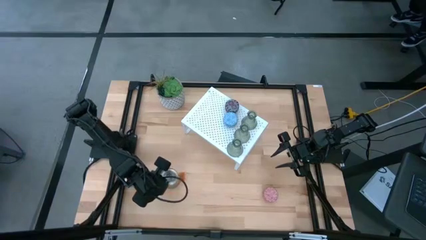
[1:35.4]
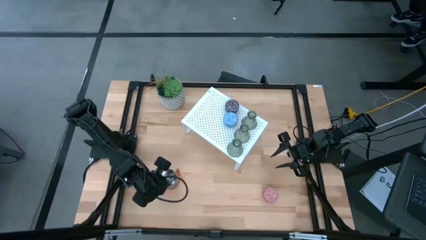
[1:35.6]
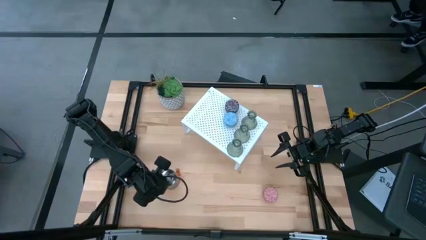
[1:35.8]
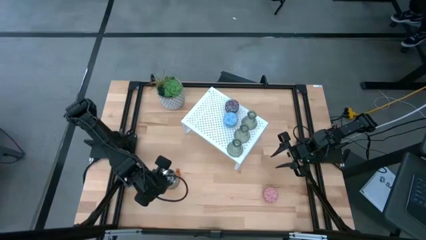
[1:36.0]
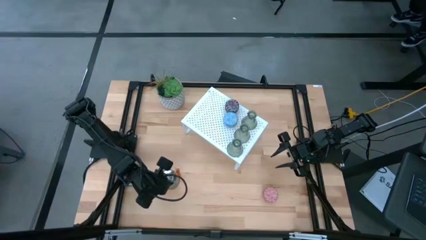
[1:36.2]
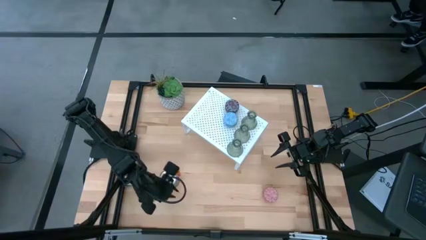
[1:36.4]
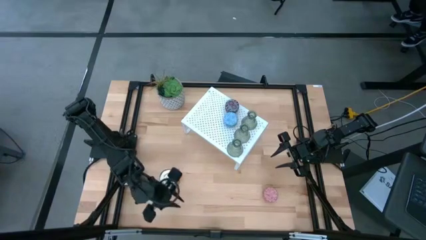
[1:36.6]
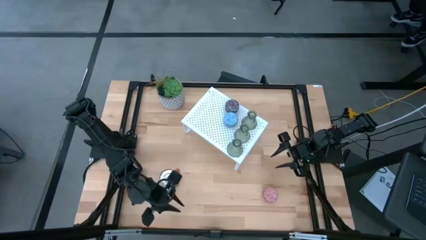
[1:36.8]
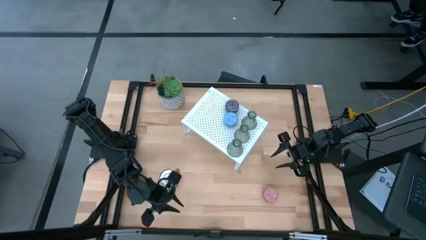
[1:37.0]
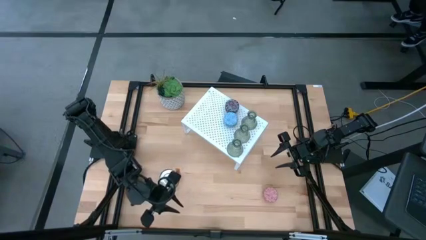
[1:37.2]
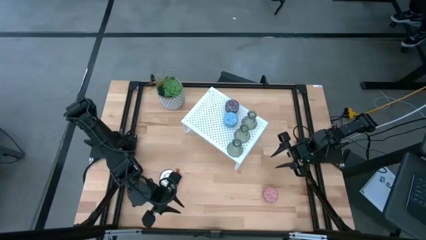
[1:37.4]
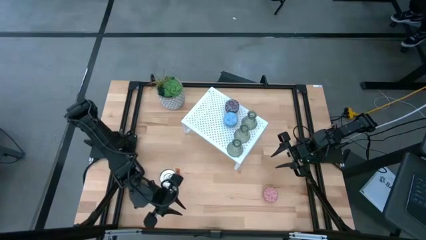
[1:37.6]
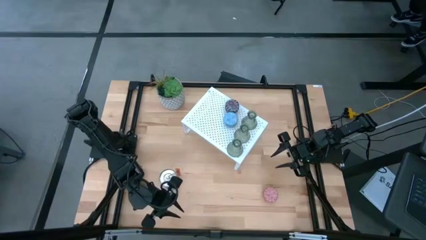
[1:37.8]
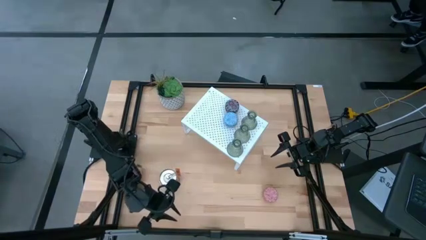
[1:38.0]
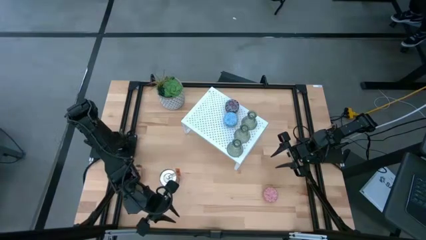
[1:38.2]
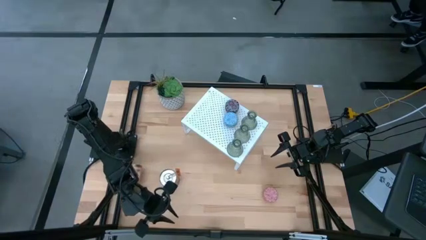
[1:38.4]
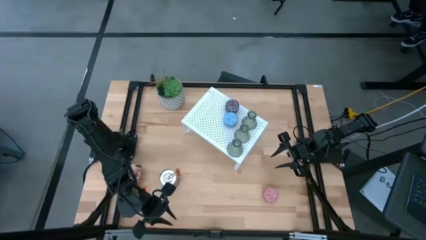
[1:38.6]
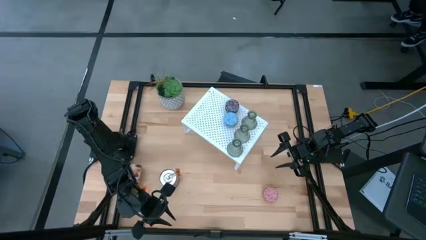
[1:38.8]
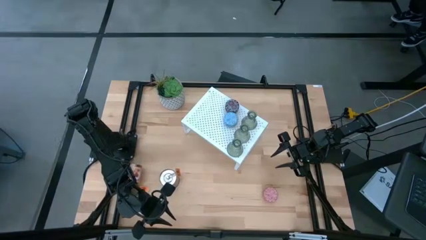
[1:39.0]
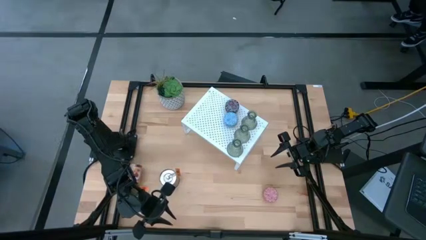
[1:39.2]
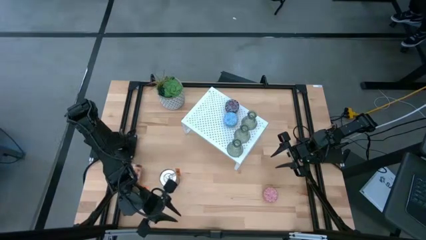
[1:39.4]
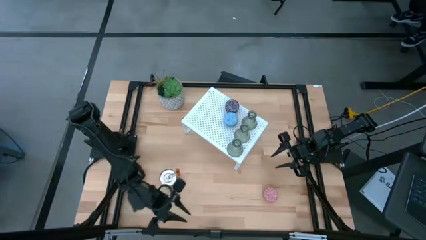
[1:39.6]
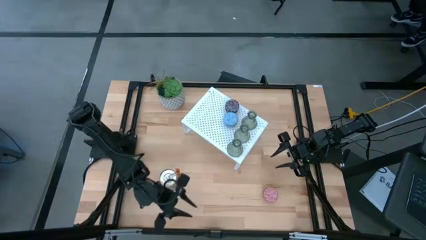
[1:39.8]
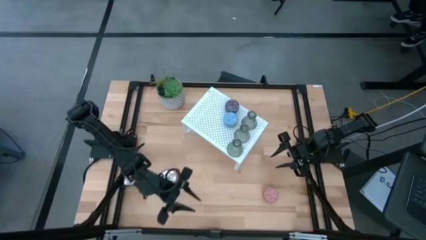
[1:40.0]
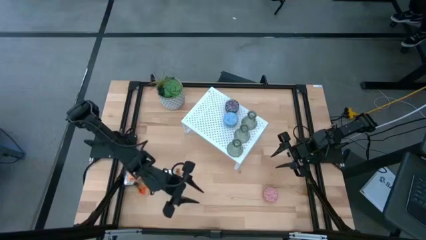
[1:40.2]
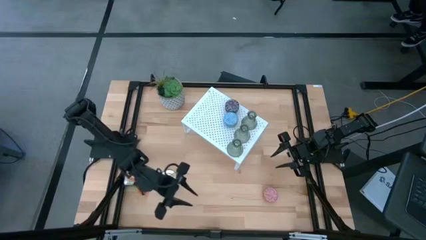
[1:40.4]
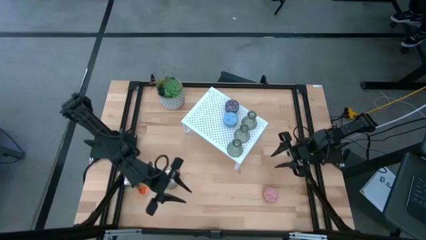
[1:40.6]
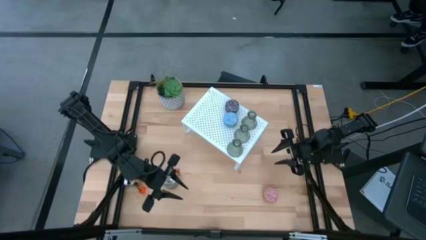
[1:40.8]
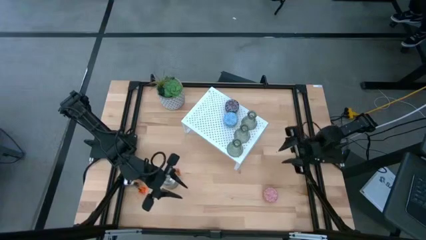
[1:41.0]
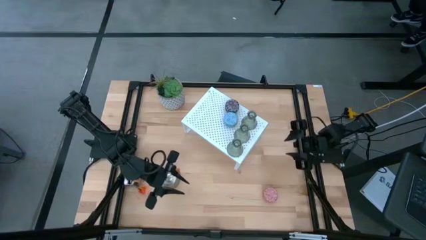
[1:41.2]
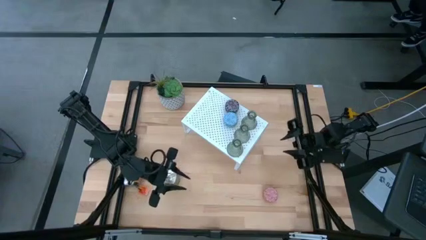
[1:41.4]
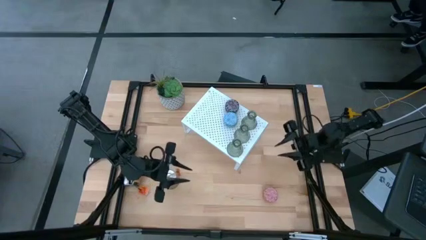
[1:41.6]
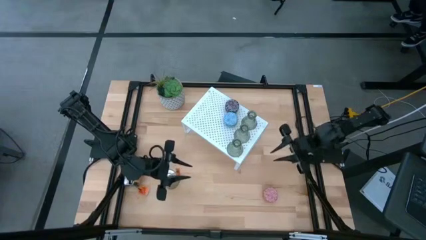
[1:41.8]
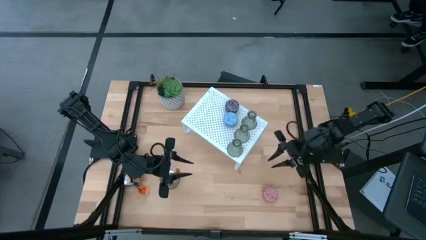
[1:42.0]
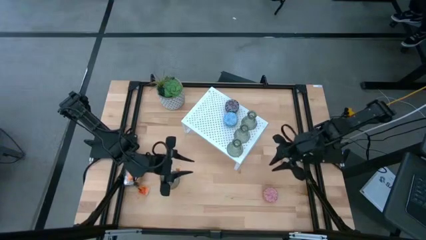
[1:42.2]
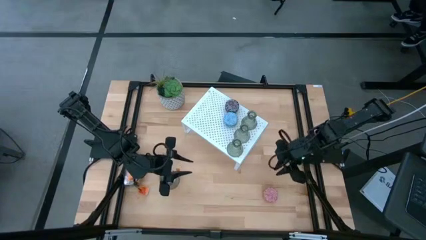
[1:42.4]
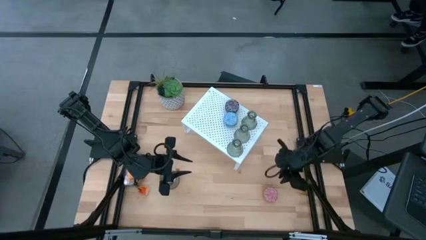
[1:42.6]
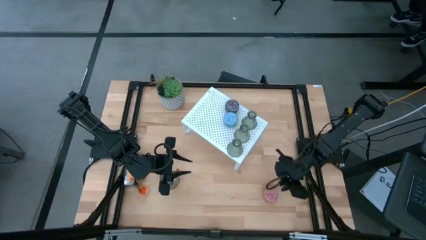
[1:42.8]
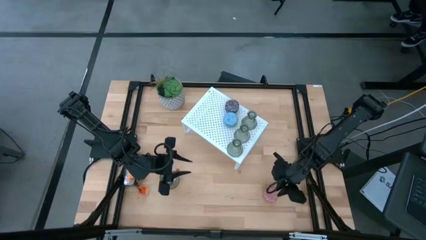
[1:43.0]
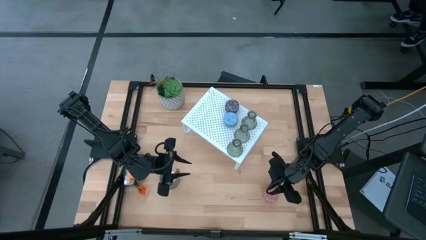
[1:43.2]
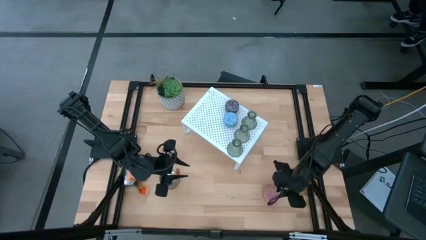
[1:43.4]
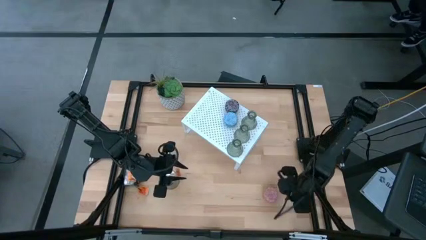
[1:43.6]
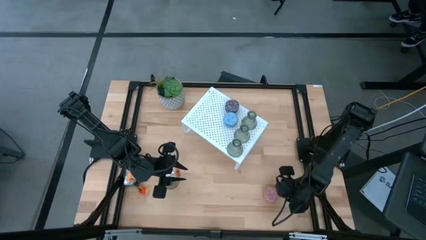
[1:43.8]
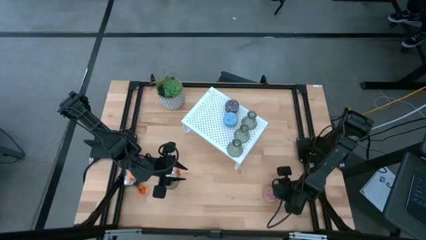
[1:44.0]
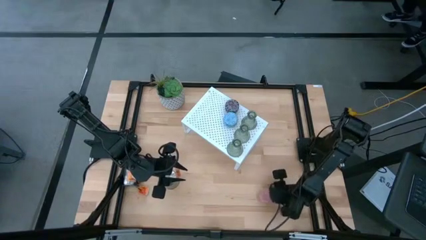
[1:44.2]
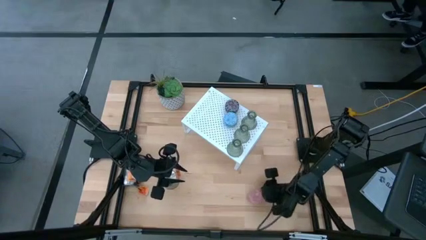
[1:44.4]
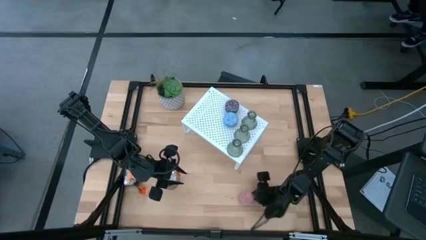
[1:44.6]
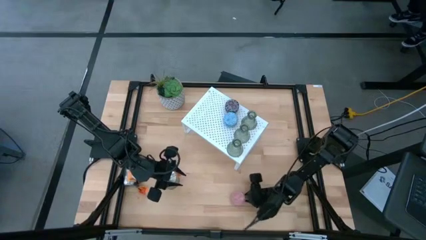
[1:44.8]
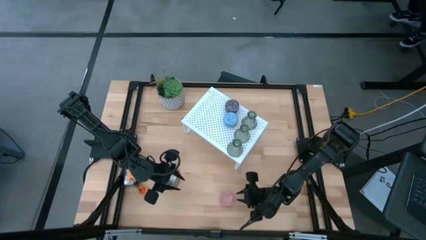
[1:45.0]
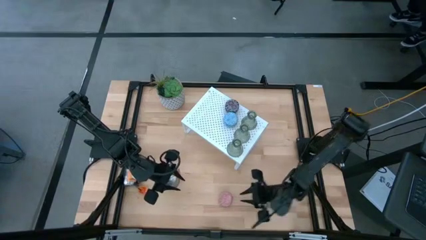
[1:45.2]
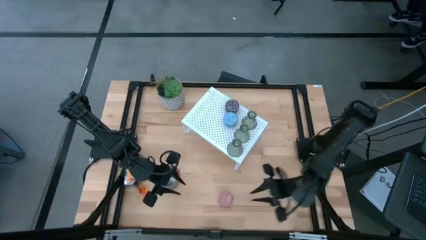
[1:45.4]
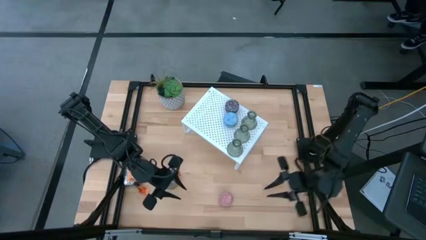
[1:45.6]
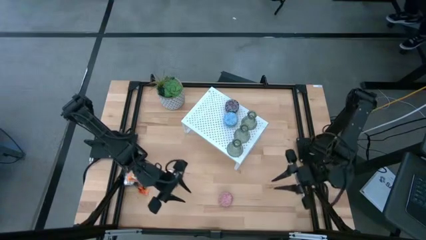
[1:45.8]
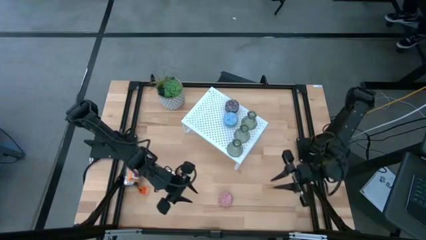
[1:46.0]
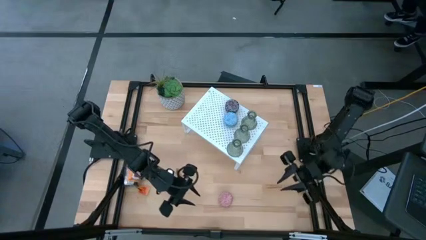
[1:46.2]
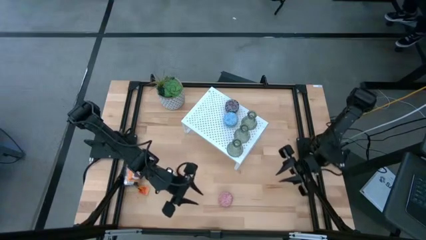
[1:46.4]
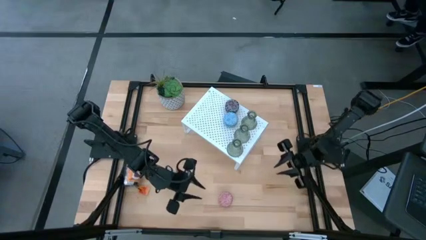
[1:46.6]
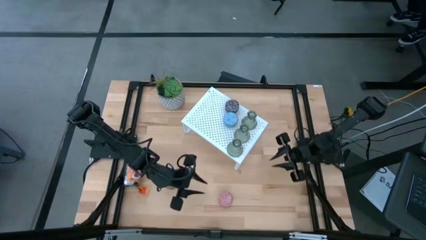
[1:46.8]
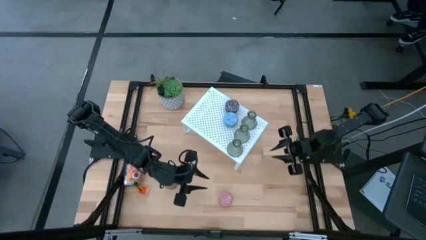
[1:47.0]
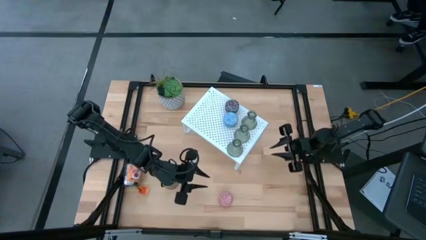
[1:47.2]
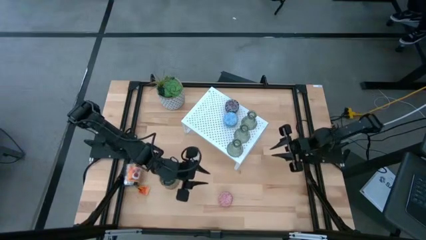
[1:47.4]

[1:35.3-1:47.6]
Task: Pick & Place candle stick holders
Put the pink patterned scented candle on the shelf aligned with the other blue patterned scented candle

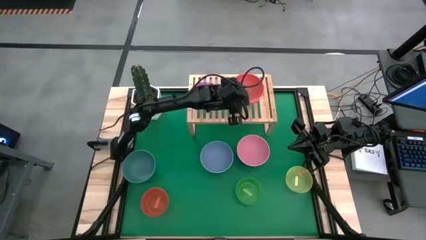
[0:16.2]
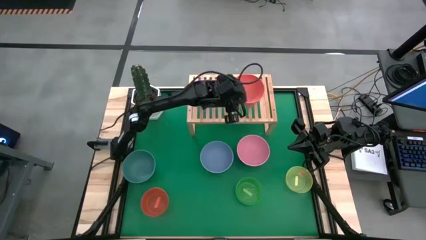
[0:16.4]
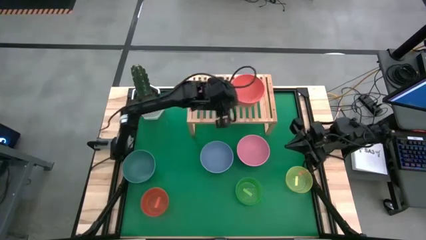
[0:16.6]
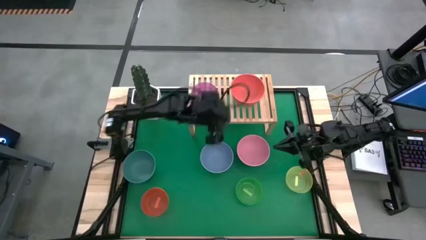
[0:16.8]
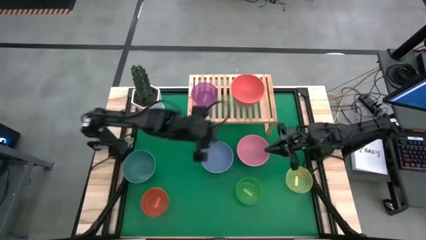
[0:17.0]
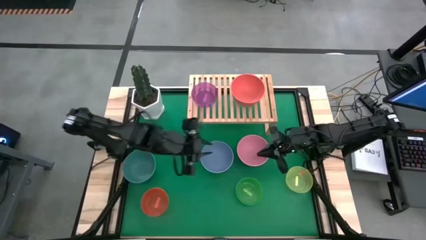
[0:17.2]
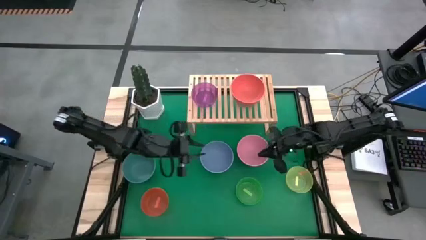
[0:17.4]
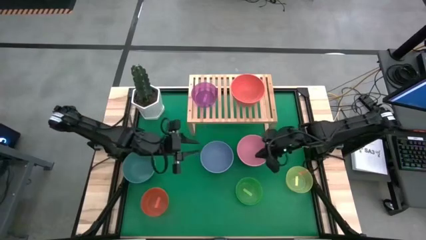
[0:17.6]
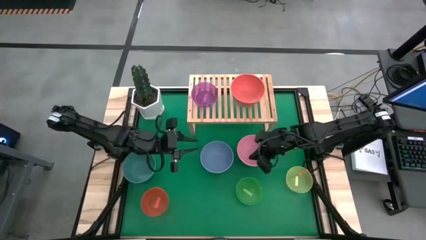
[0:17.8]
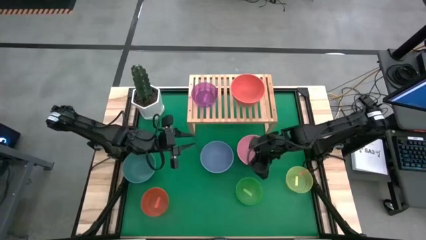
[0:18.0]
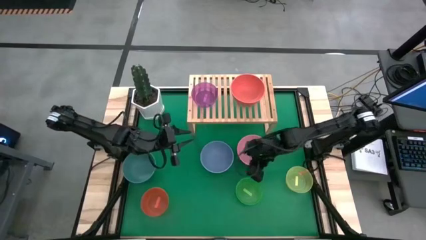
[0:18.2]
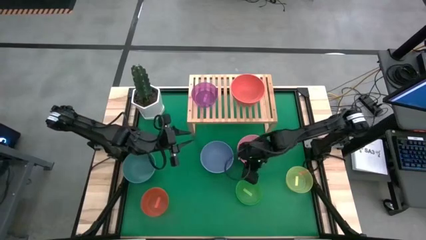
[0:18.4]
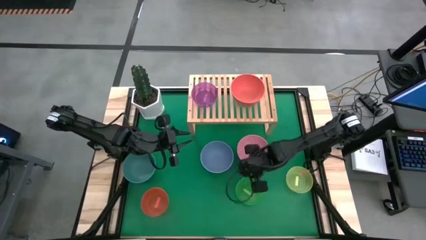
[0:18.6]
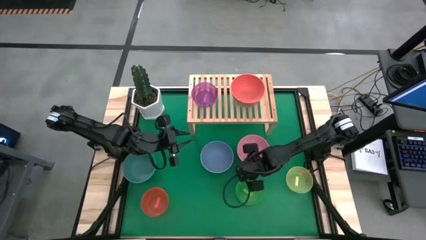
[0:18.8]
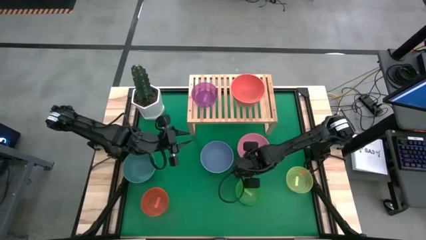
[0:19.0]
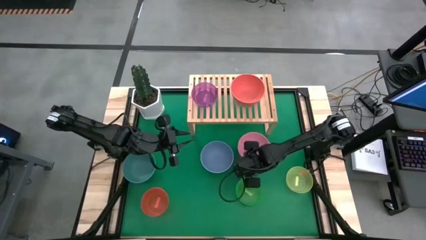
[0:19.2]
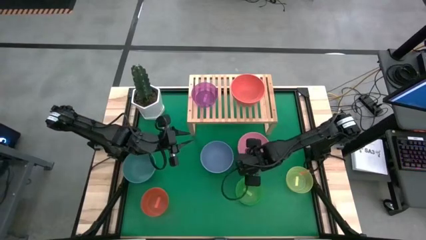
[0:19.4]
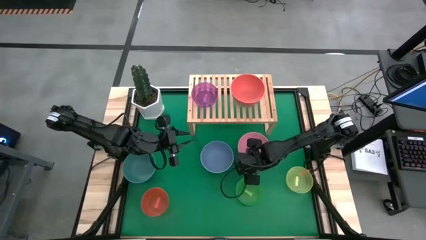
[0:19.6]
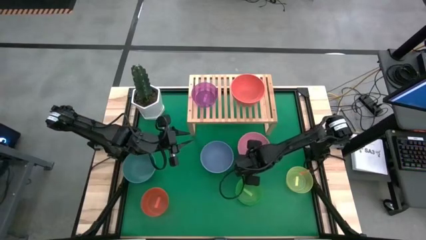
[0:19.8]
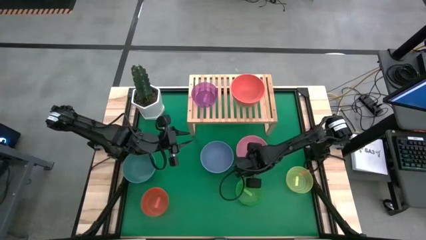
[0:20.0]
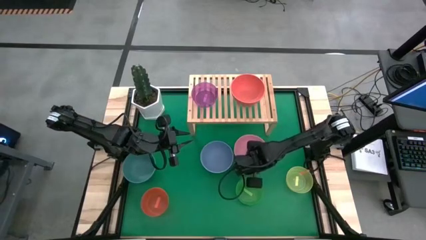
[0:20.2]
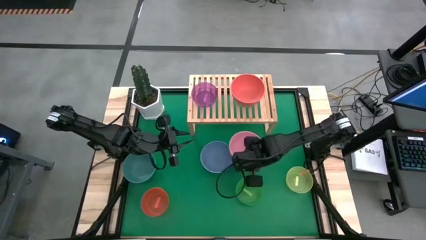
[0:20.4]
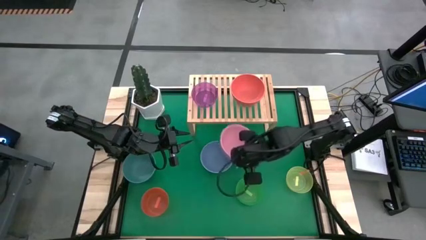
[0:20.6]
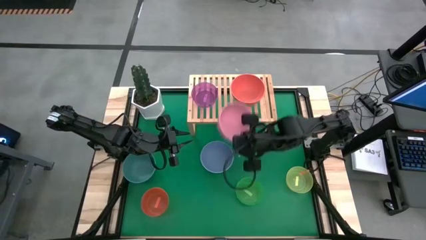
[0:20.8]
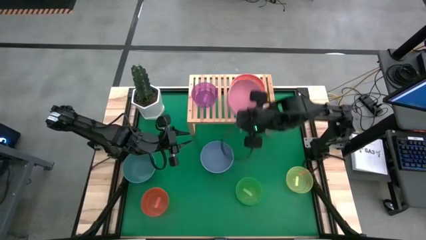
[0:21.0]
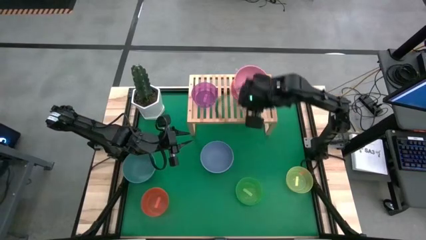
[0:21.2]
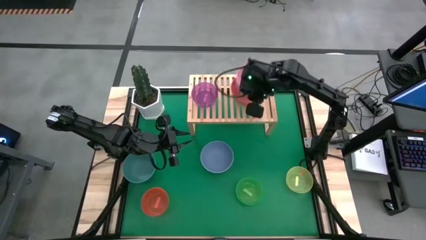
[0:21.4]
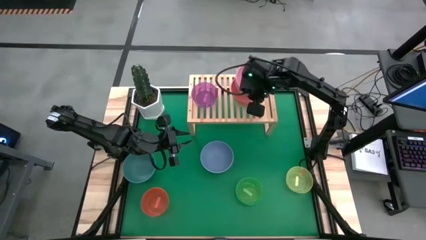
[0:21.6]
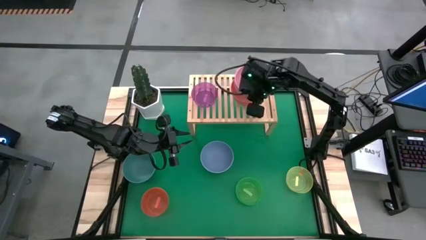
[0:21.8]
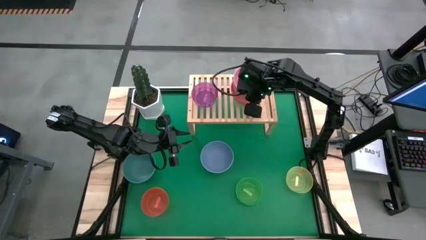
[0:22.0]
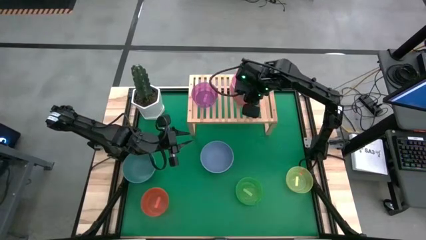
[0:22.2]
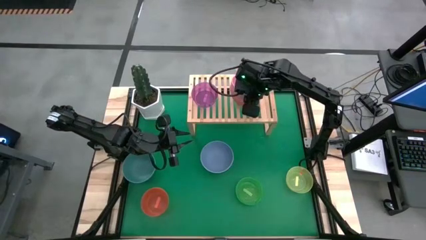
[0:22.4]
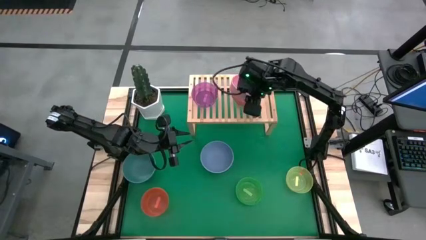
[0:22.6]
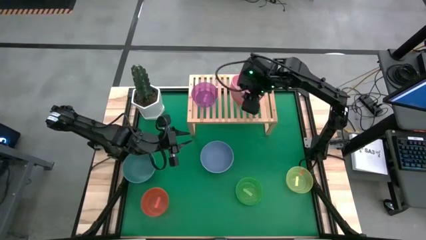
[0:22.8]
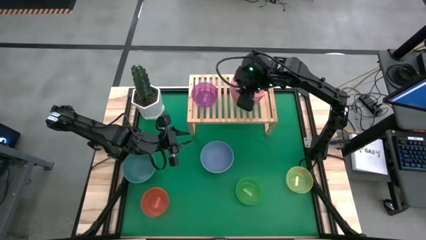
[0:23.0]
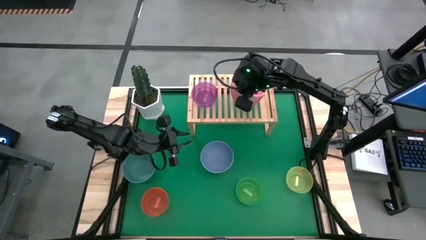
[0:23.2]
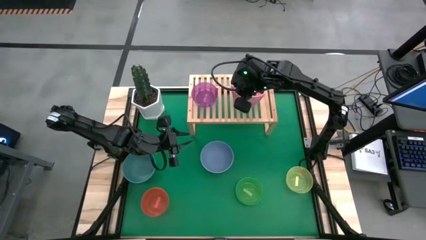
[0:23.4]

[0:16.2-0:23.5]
Task: Place and stack bowls onto a shelf
Stack the pink bowl on top of the orange bowl on the shelf
